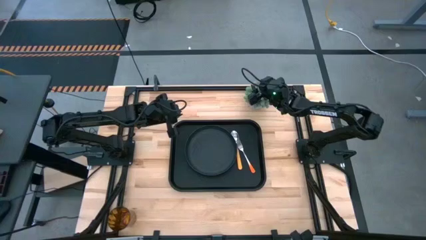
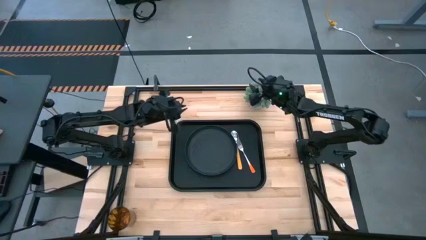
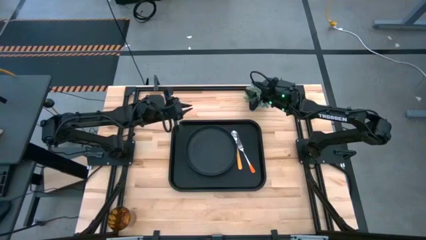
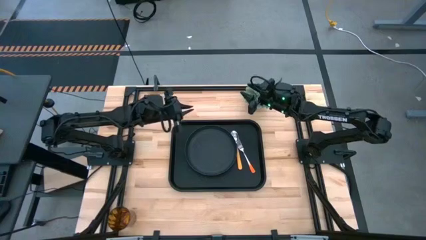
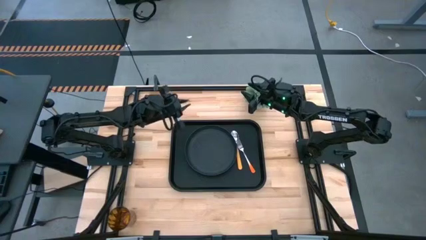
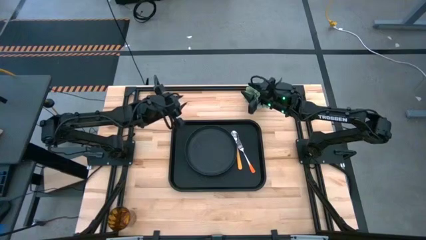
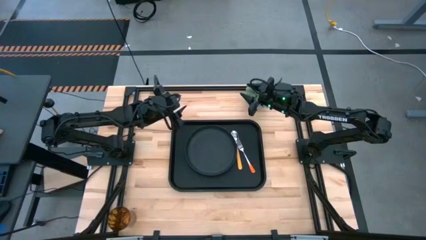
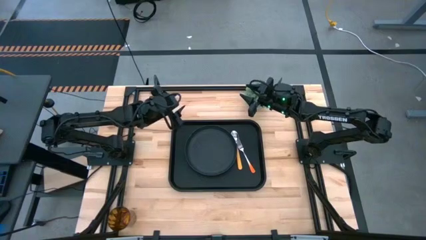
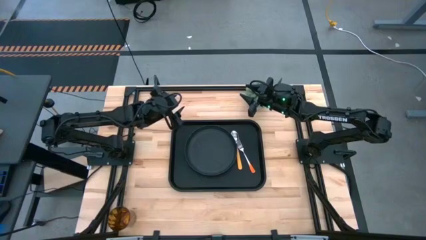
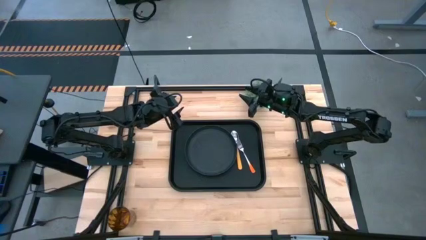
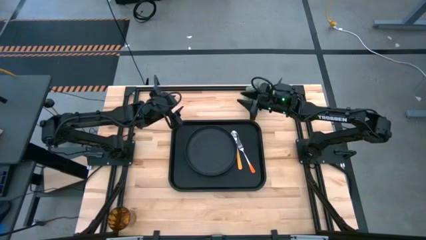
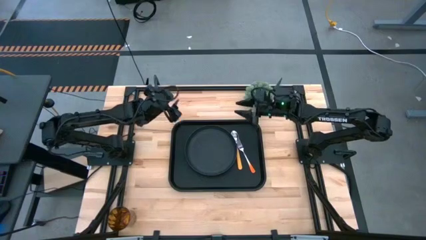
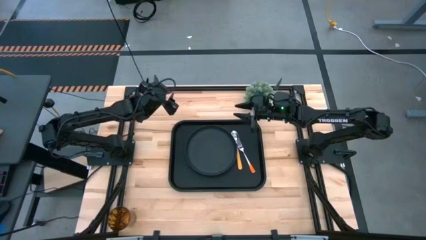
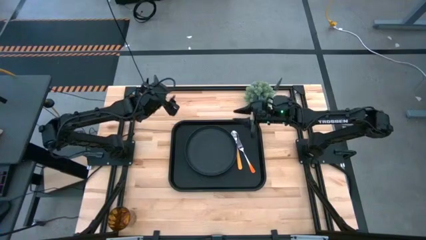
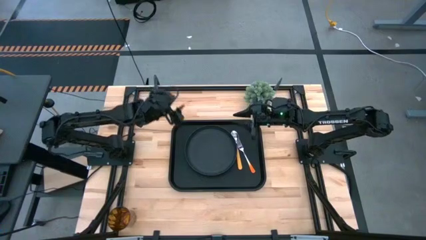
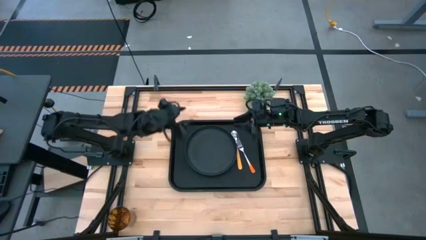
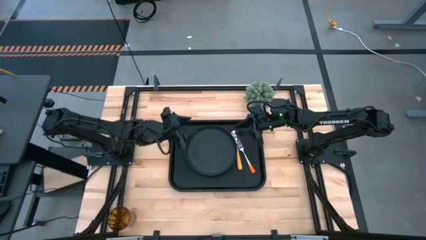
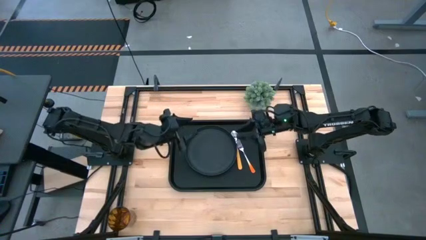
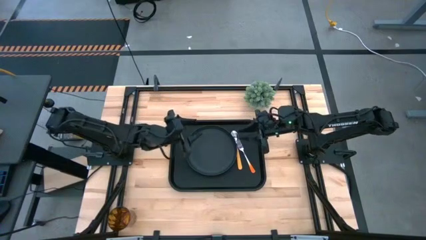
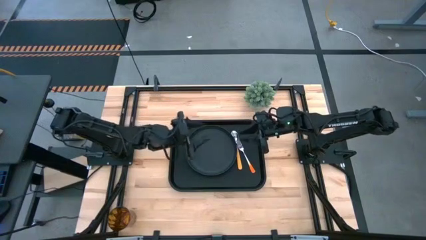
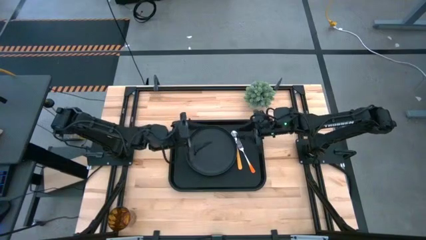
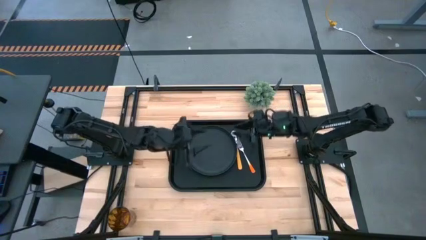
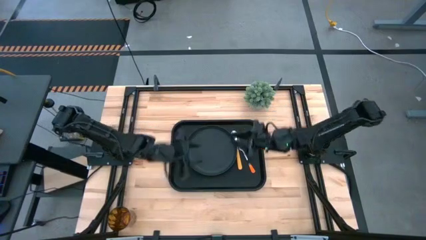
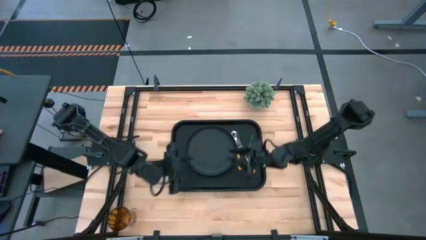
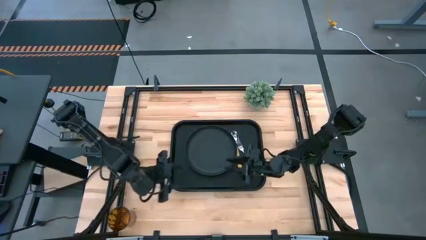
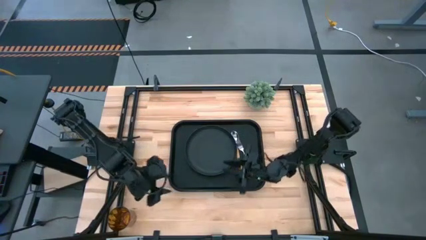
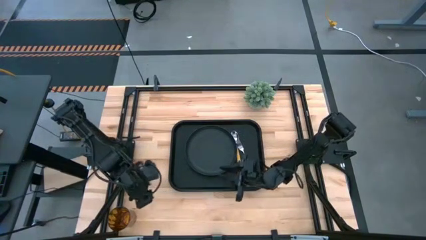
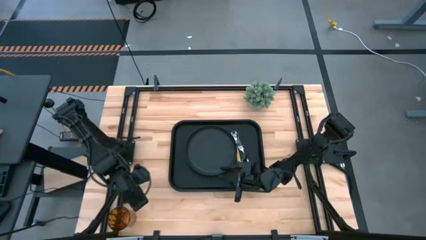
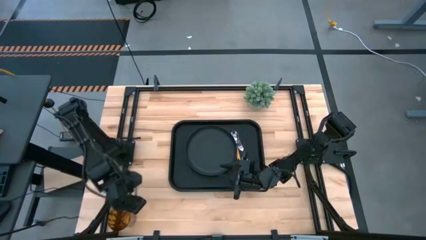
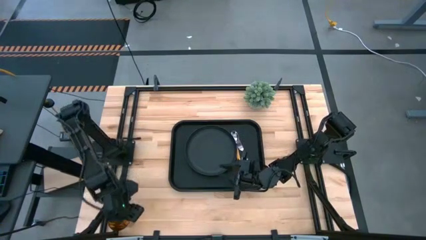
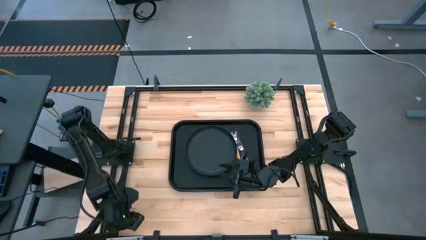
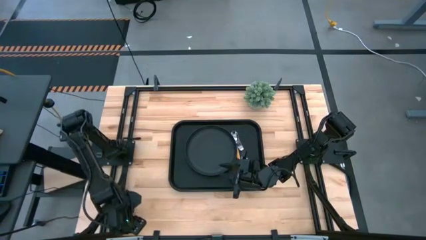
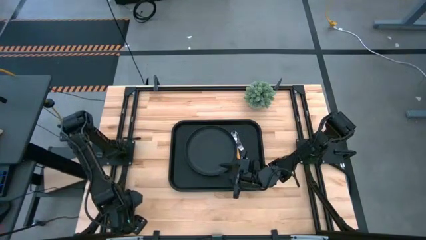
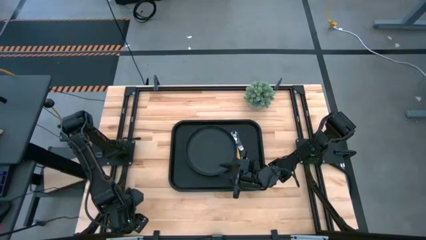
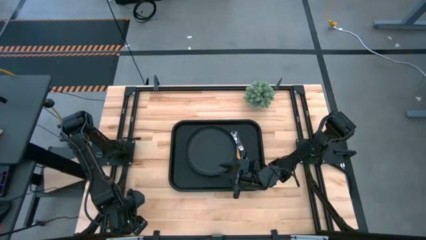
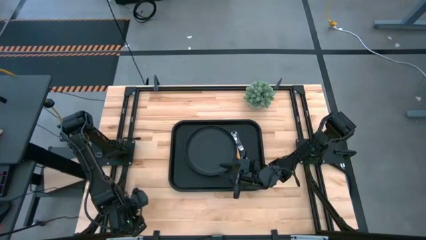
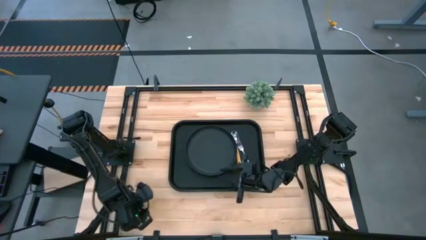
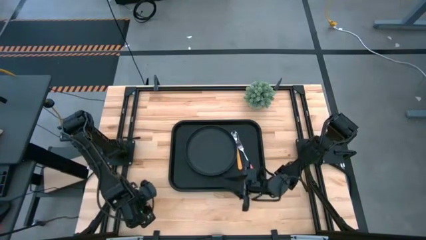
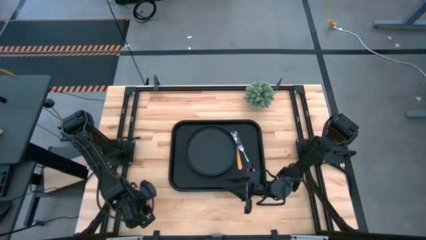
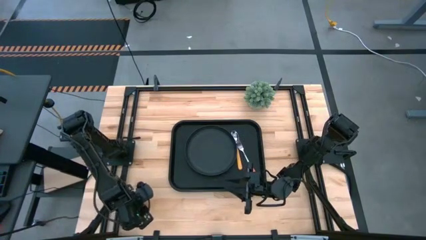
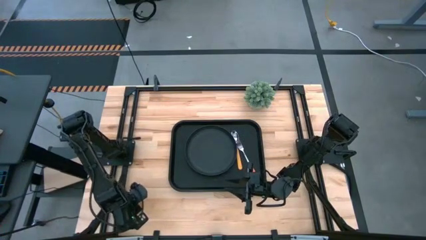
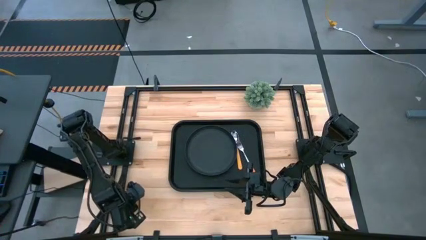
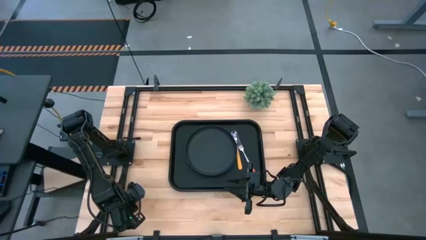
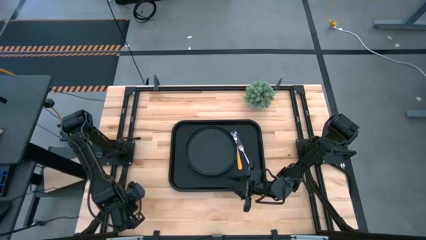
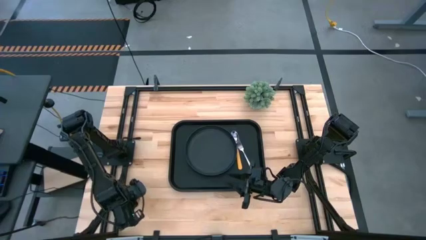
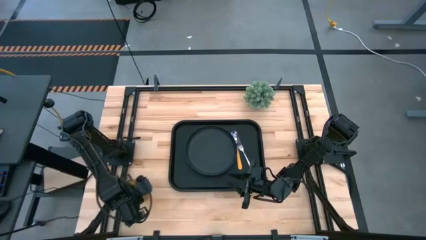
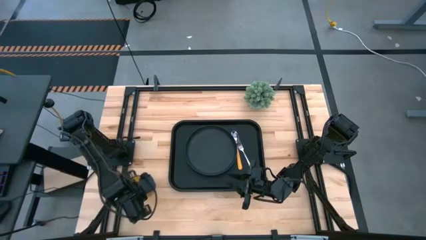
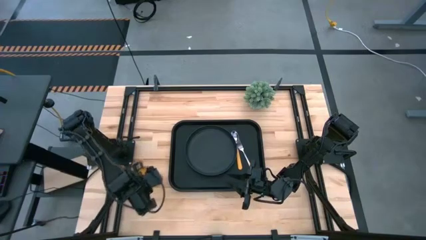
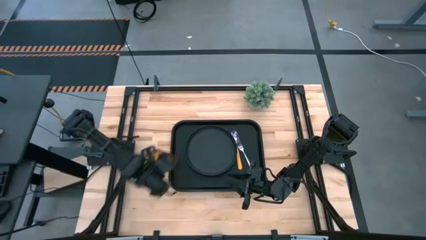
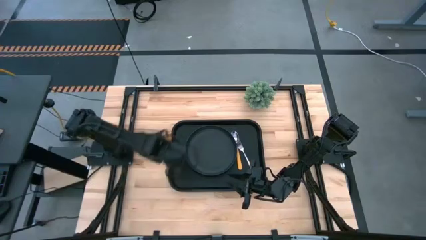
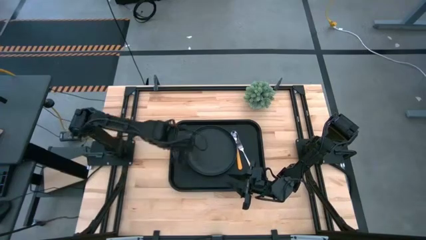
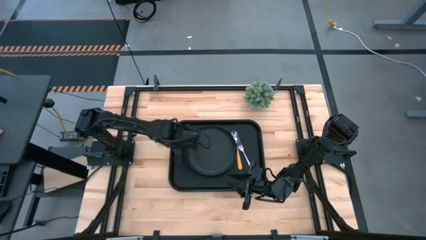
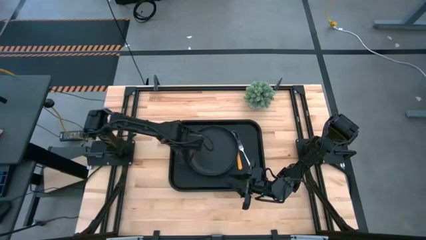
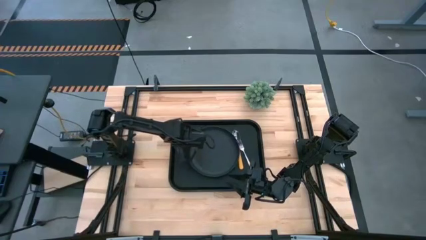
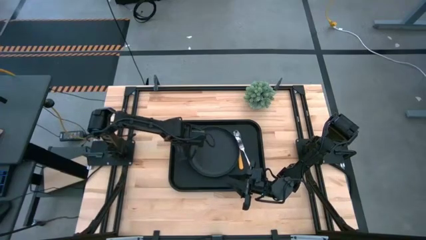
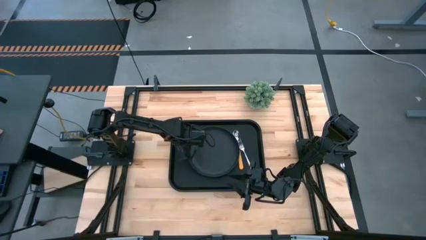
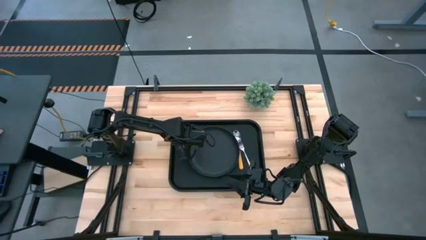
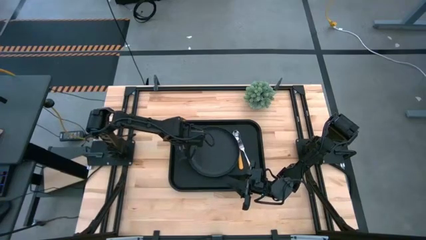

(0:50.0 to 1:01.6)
Task: Pick and place plate/cup/fork/spoon on tray
Put the orange cup on top of the black plate on the black serving tray

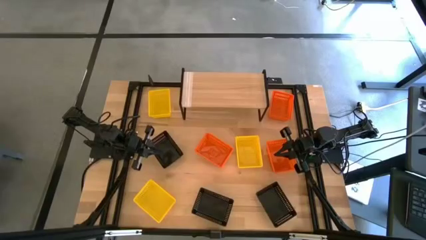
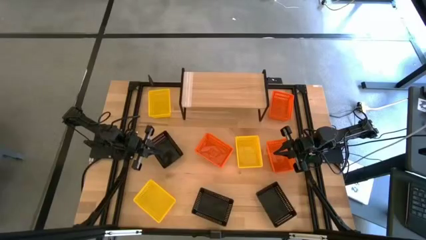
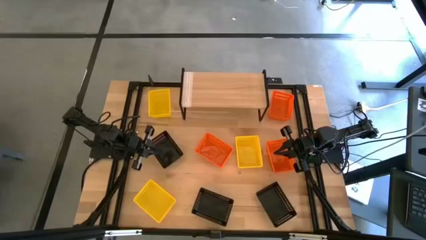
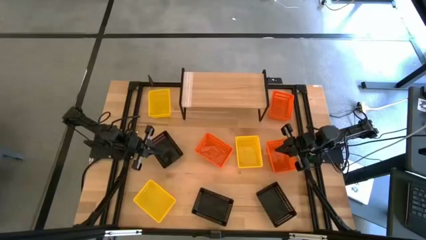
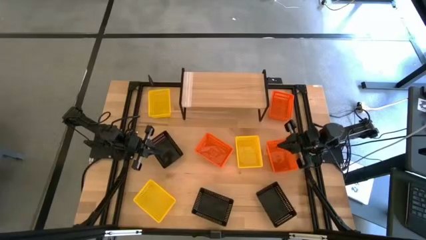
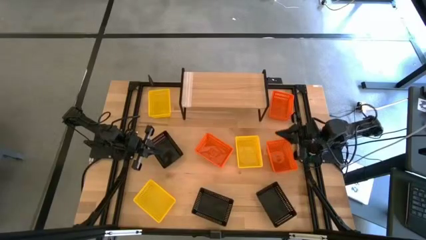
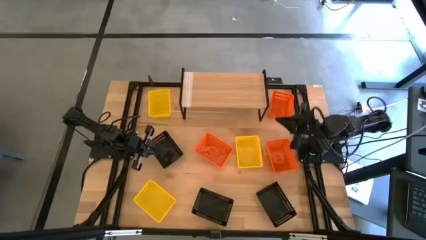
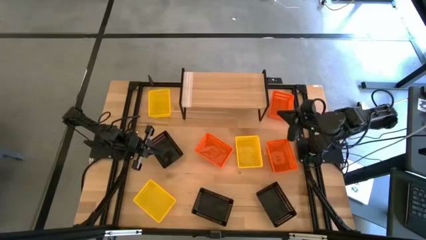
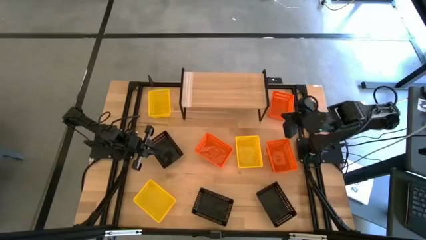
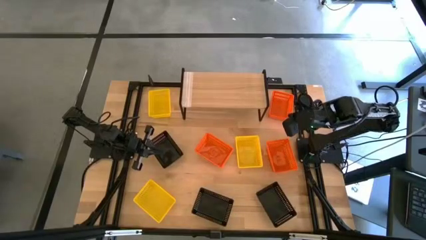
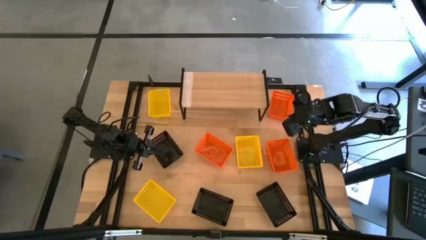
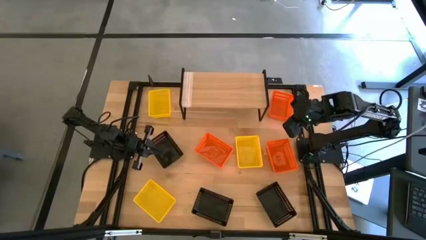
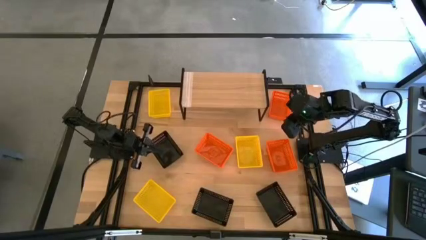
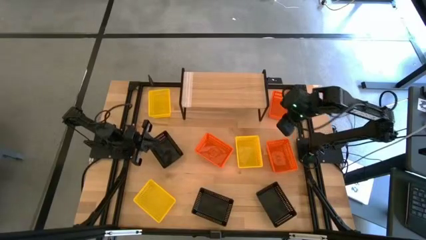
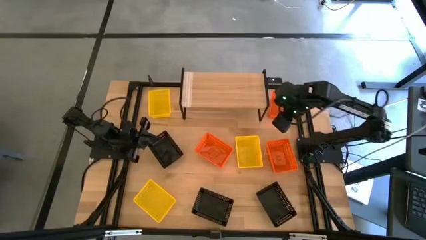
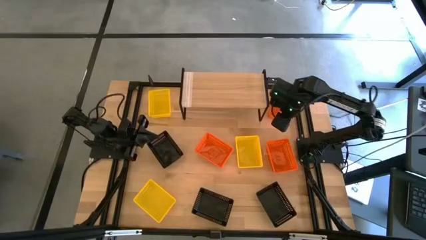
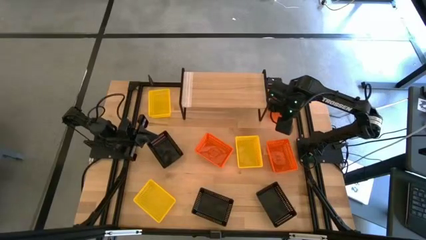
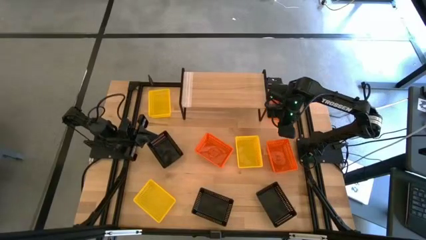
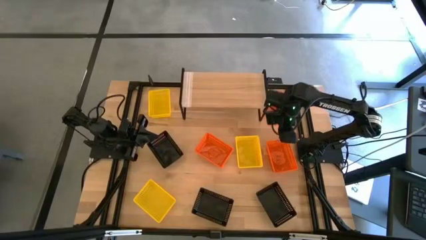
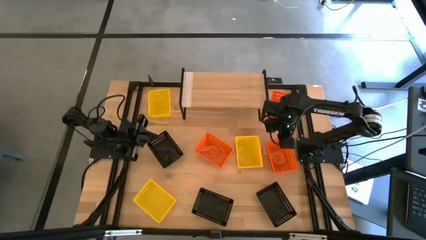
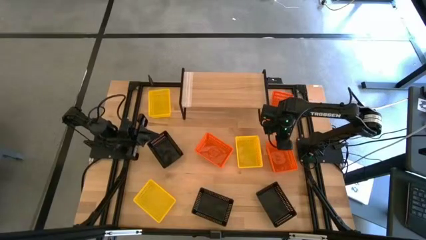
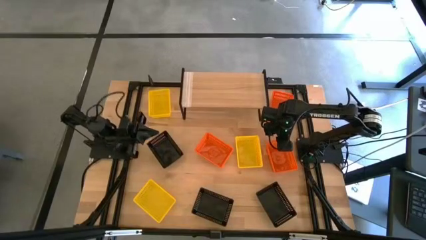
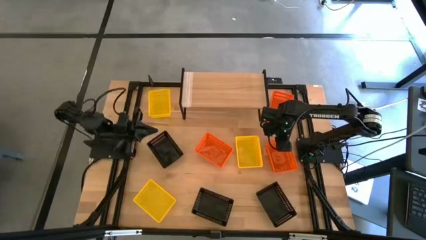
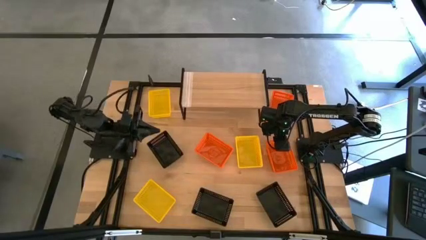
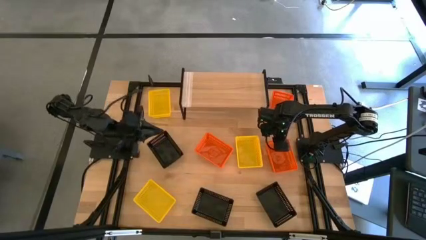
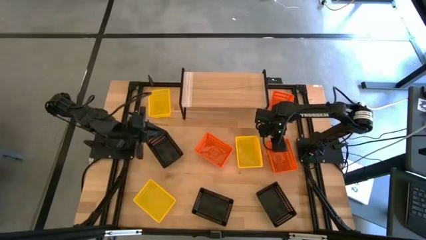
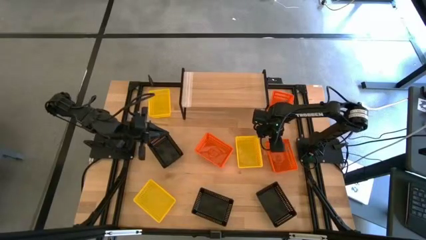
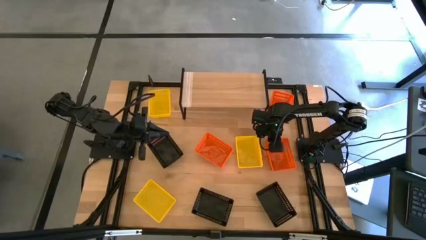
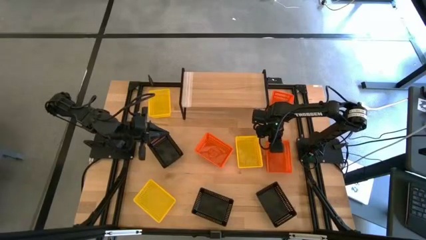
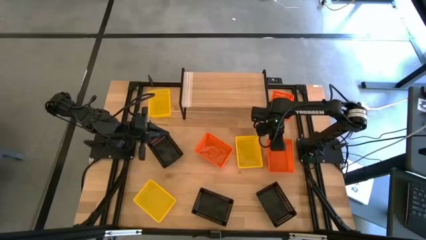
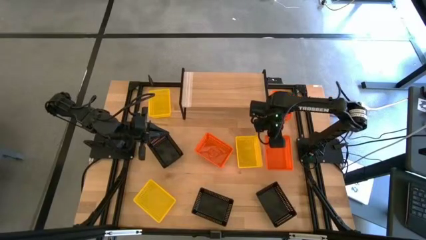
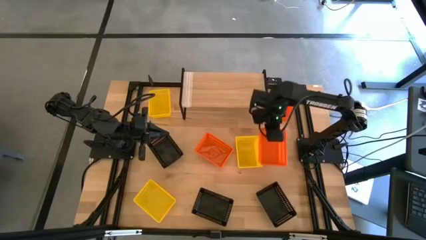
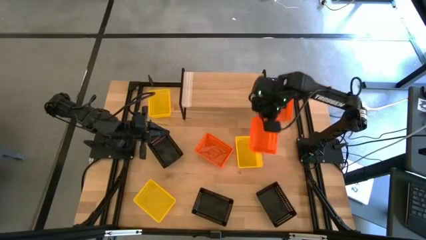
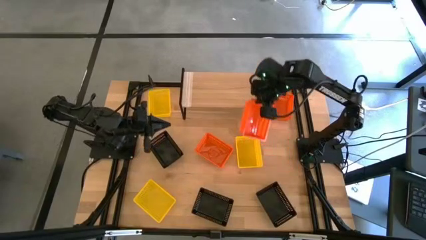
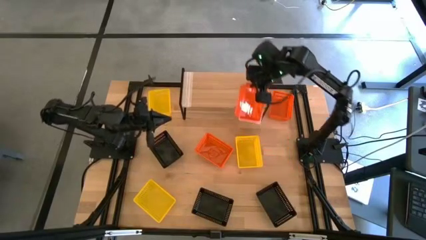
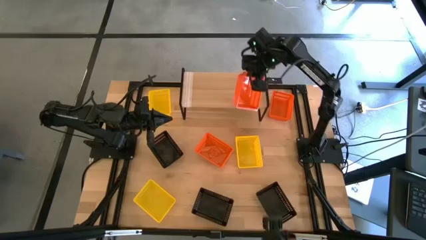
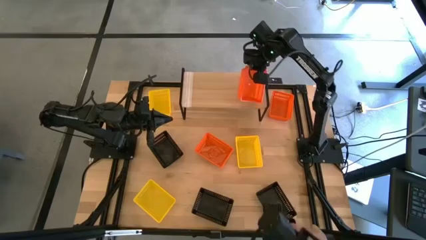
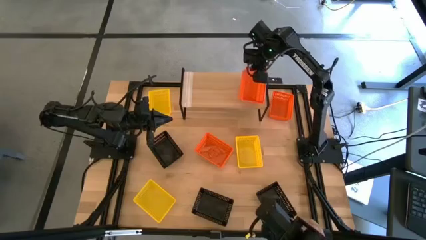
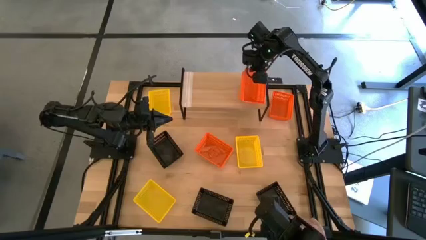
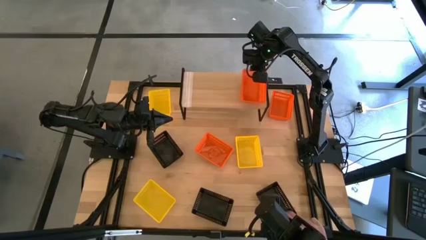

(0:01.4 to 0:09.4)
Task: Stack baskets on shelf by color
Put the bottom right orange basket on the shelf
